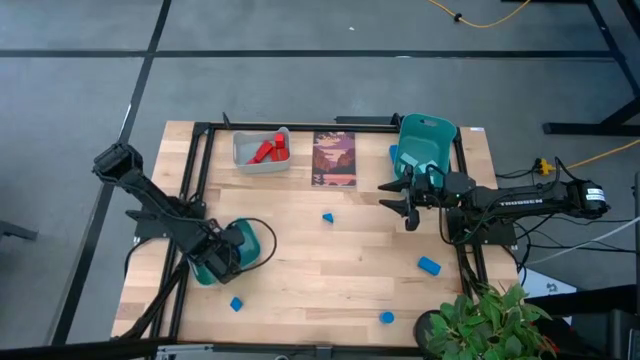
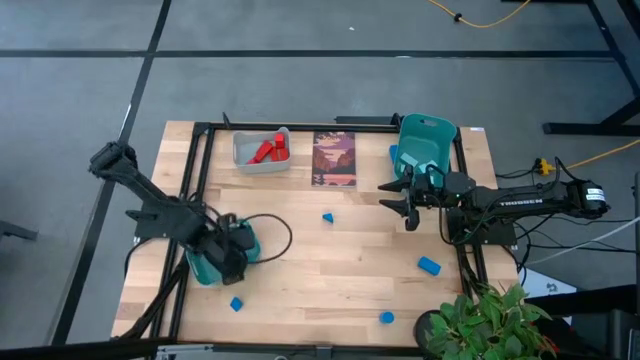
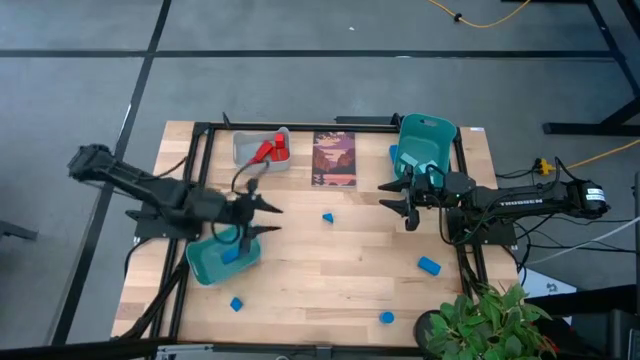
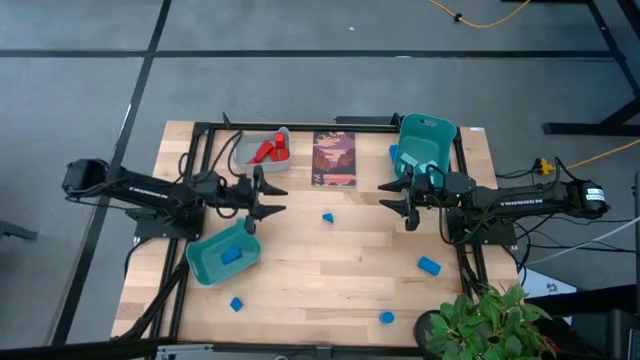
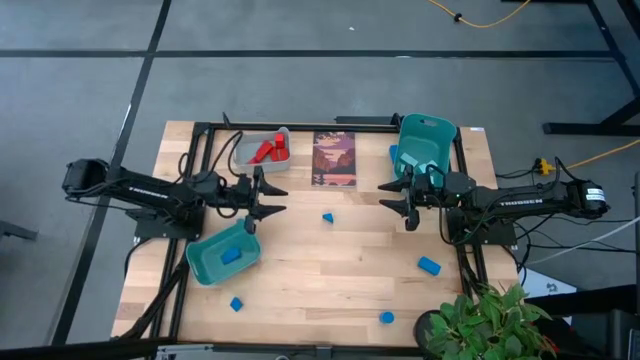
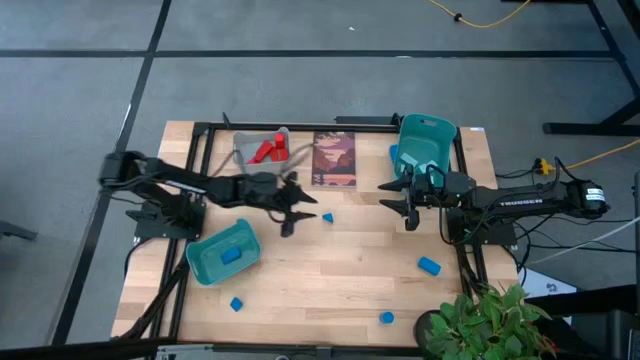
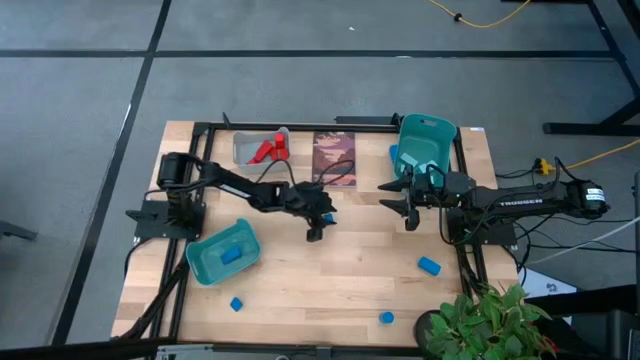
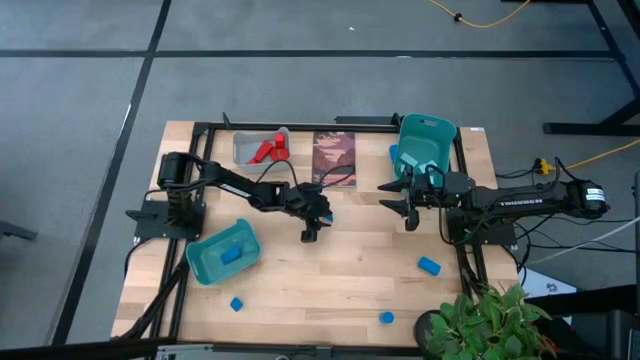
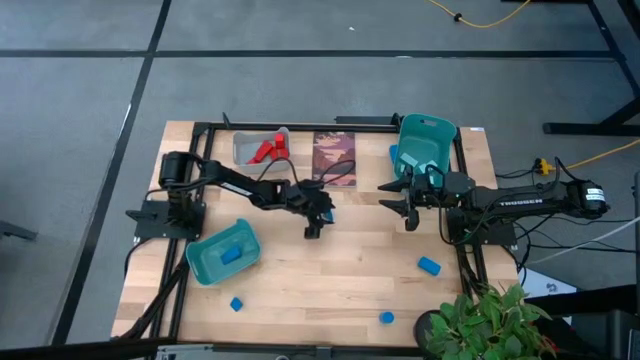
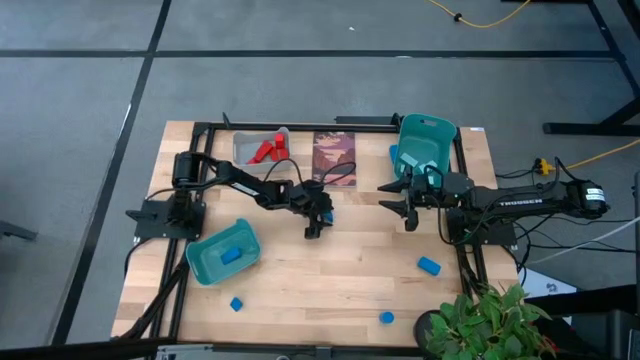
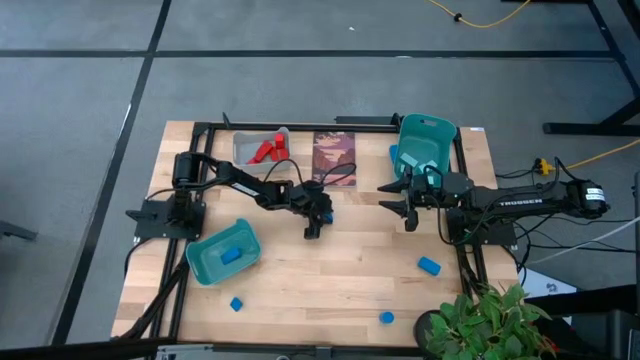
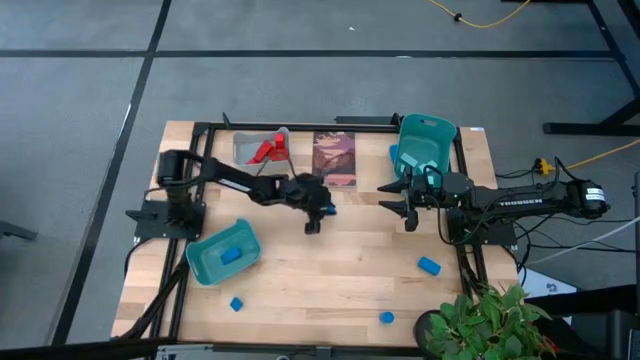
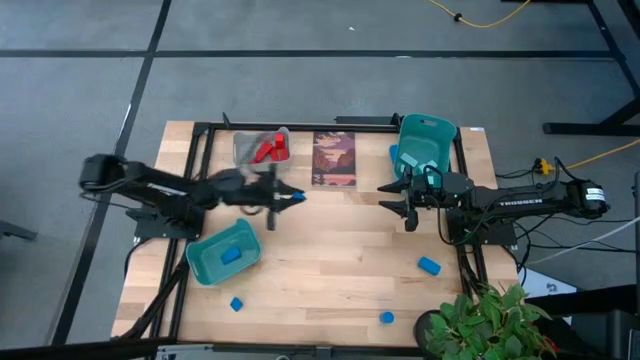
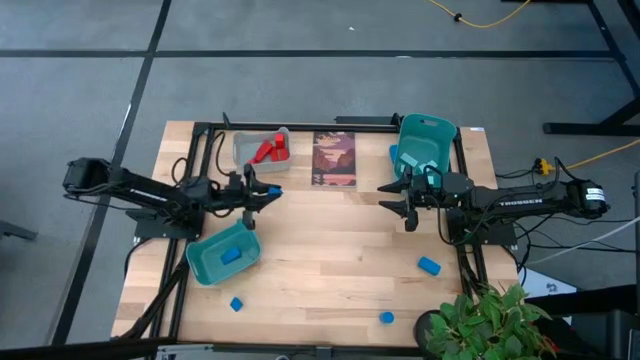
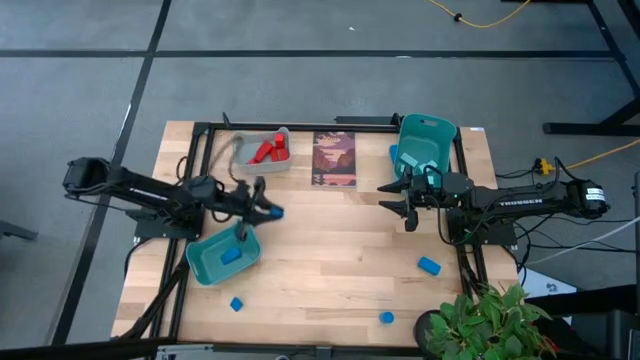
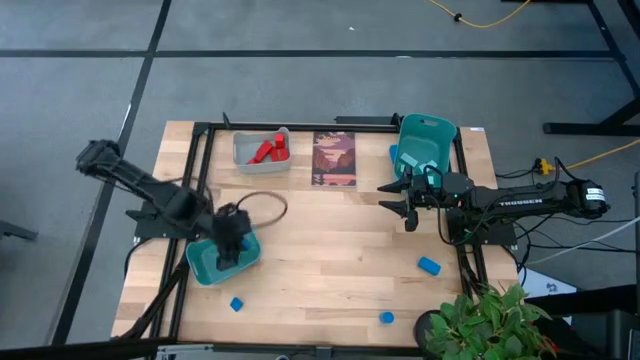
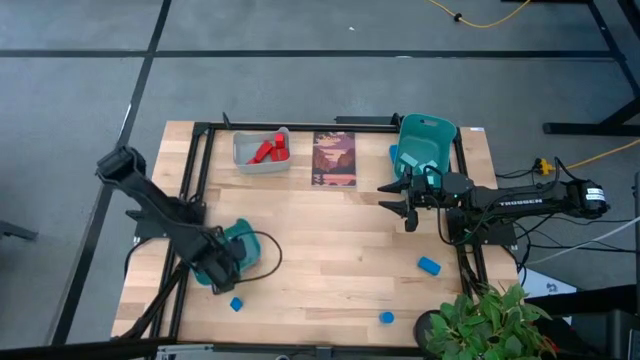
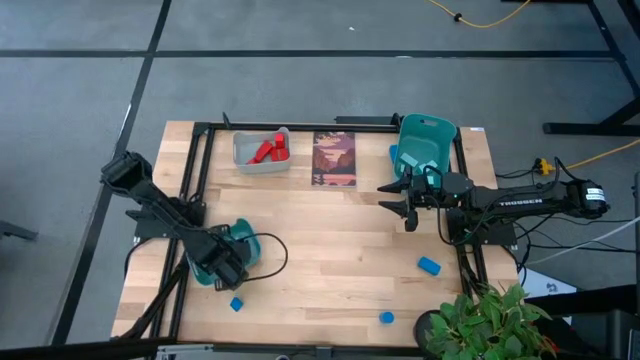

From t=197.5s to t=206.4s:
Task: Sort & place blocks by color
Put the blue block into the left green bin

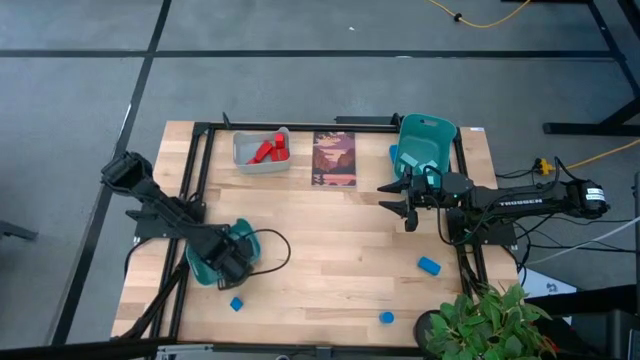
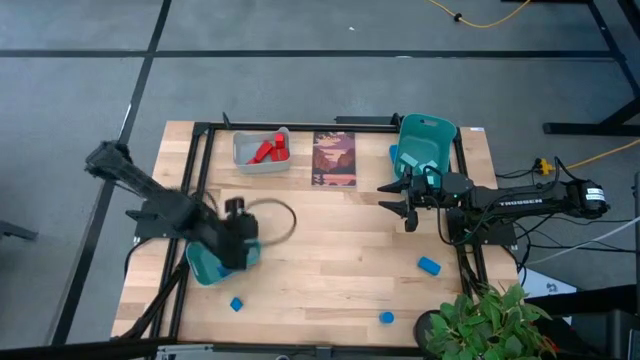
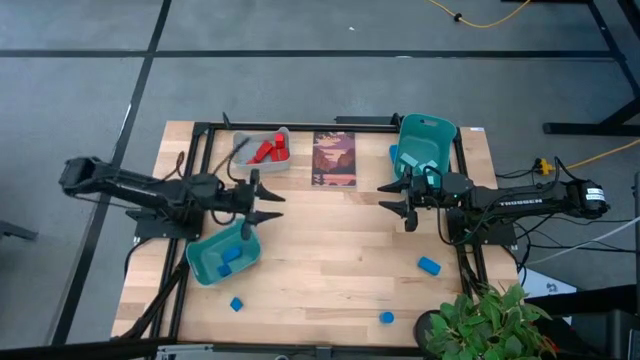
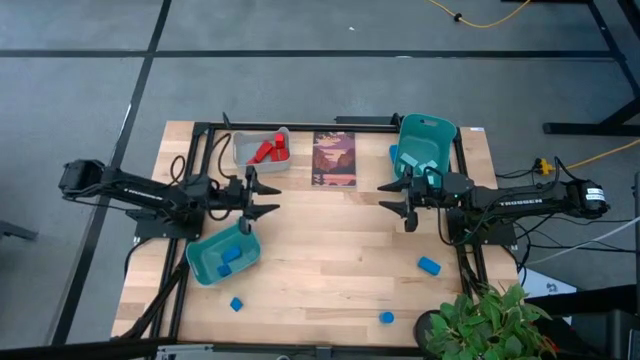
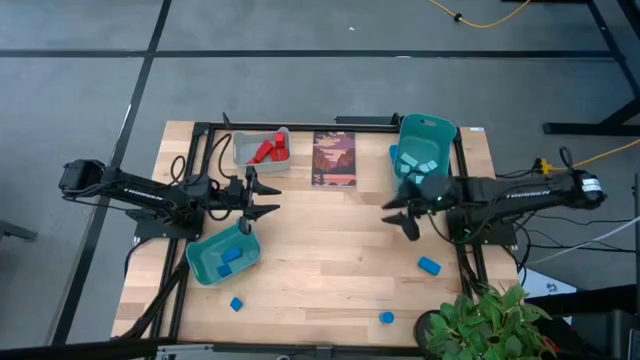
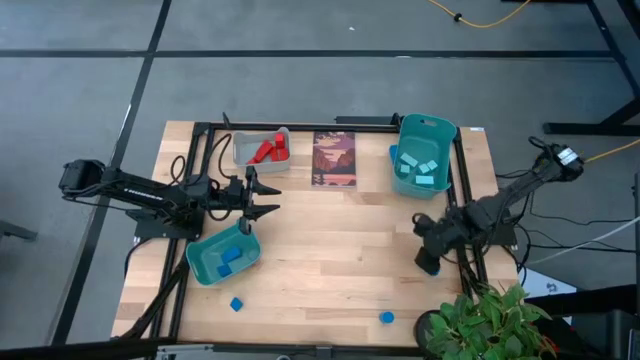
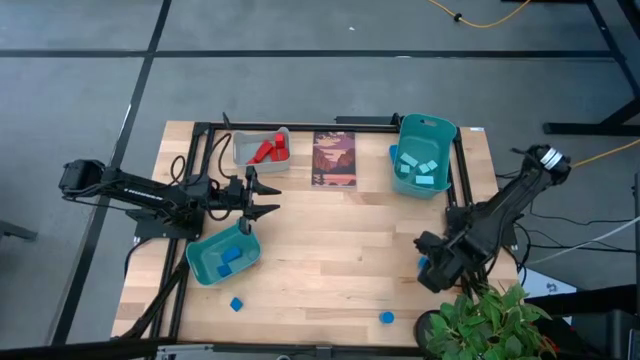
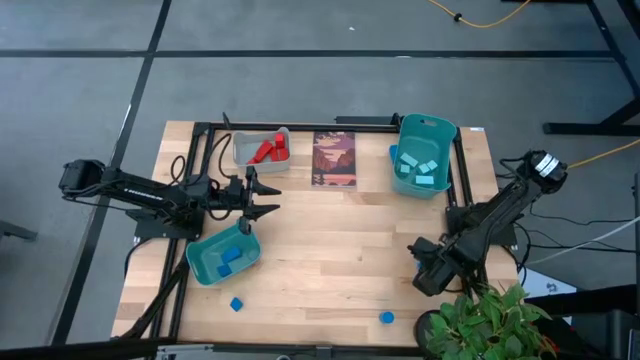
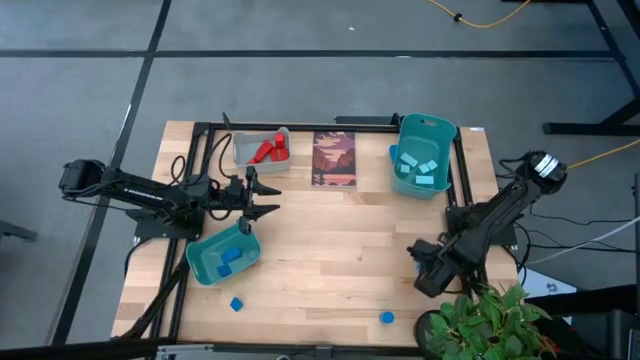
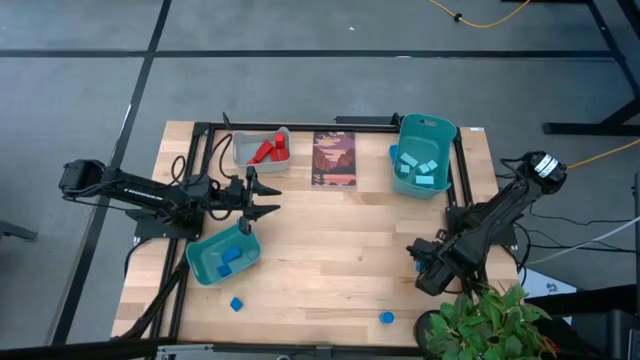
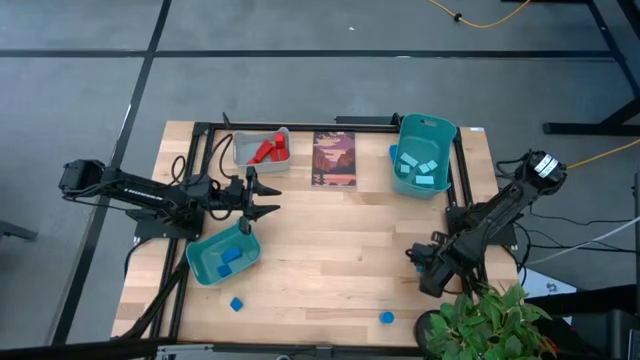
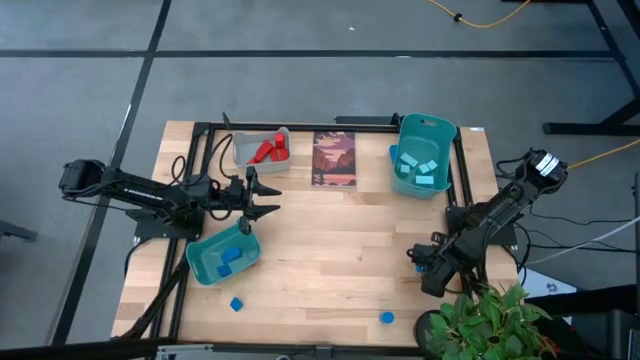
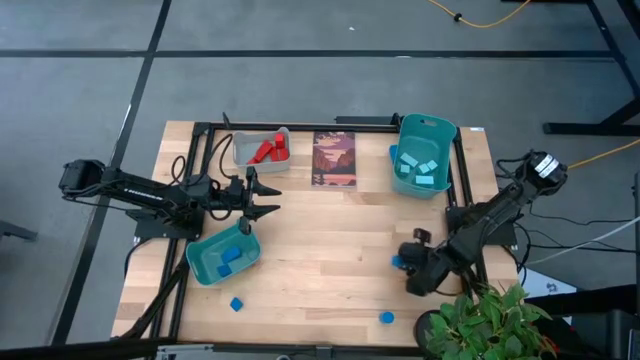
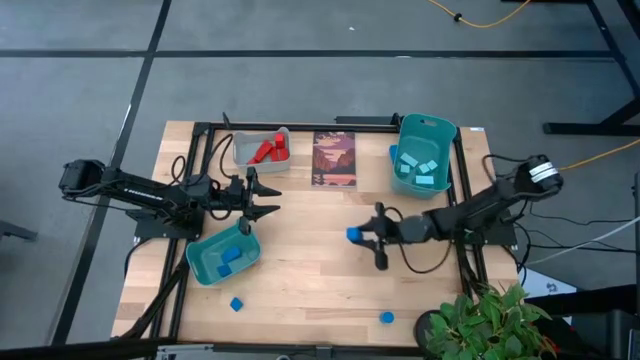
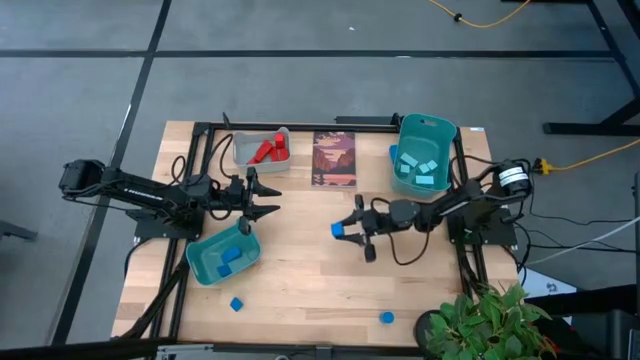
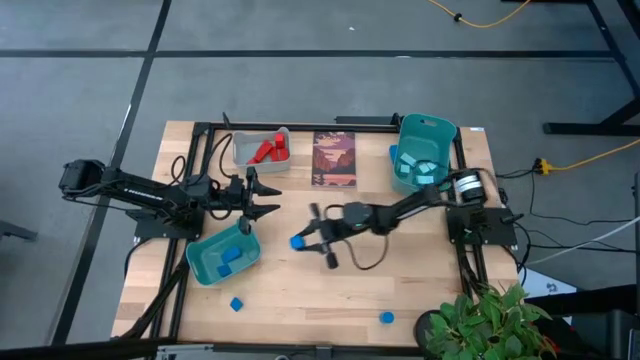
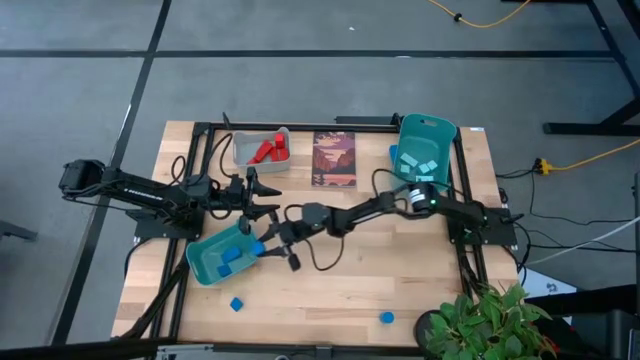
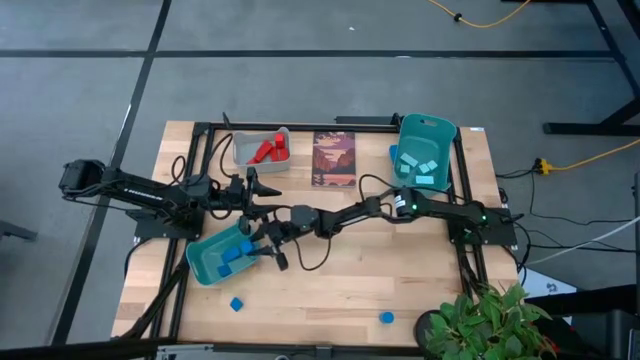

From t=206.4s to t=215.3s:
Put the blue block into the left green bin

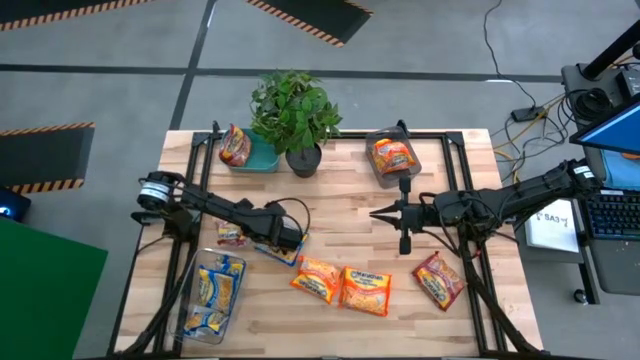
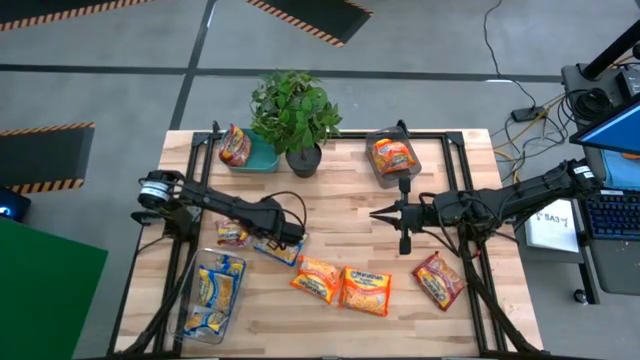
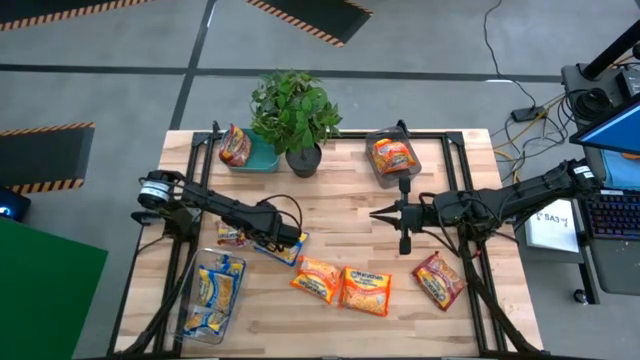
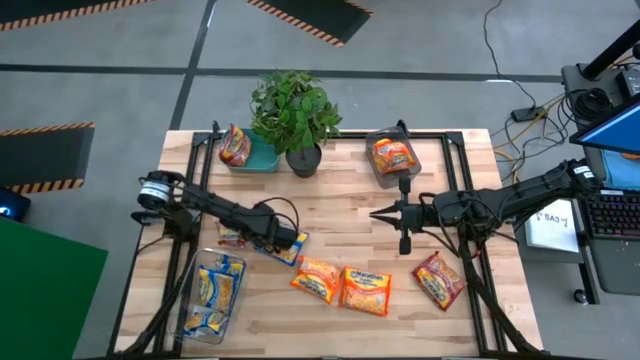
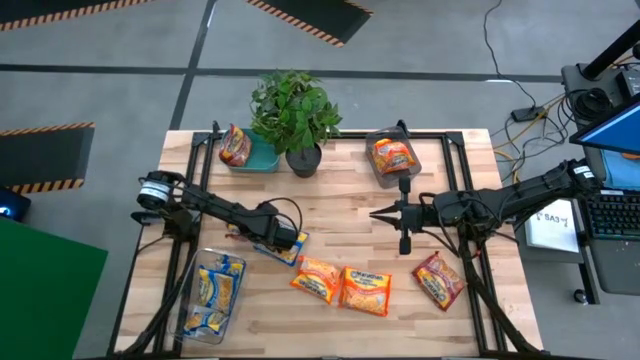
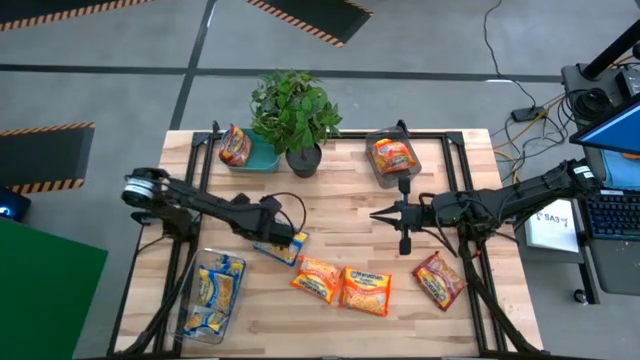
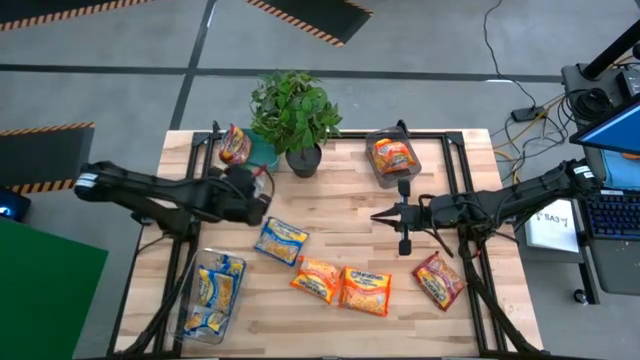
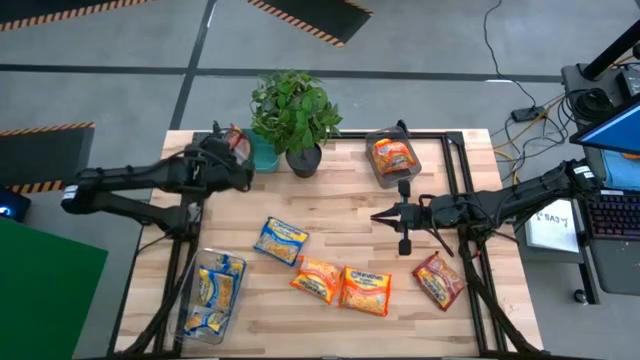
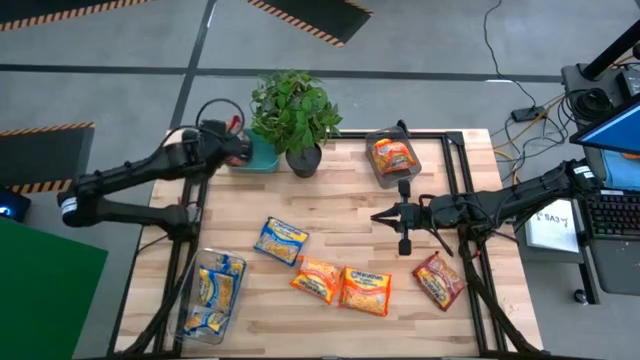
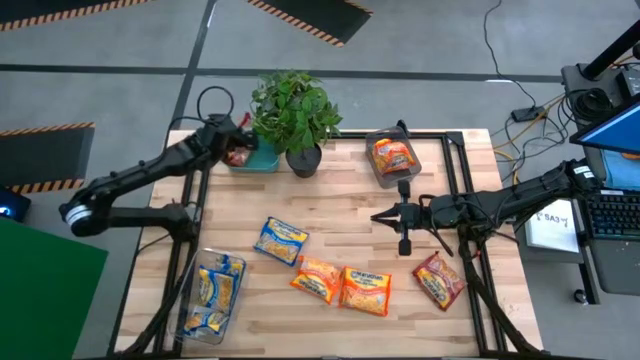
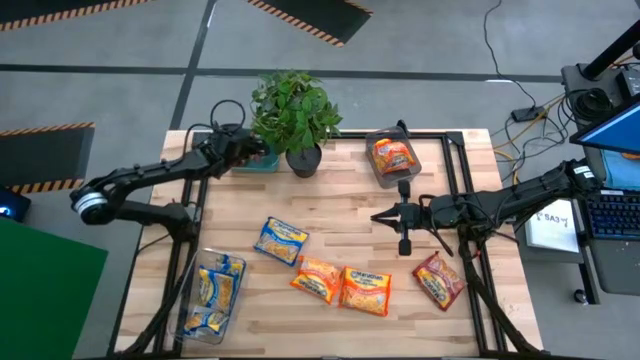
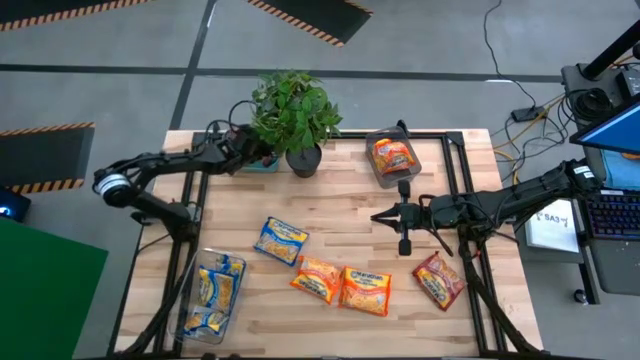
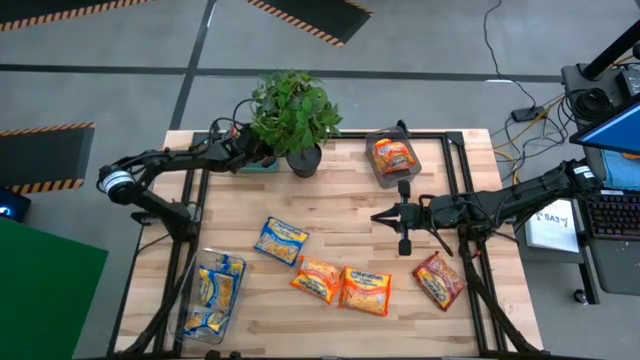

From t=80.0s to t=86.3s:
Task: Sort Maruchan noodles
Put the red noodle pack into the green bin
